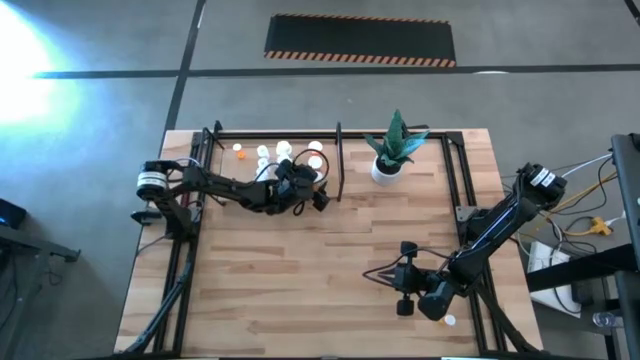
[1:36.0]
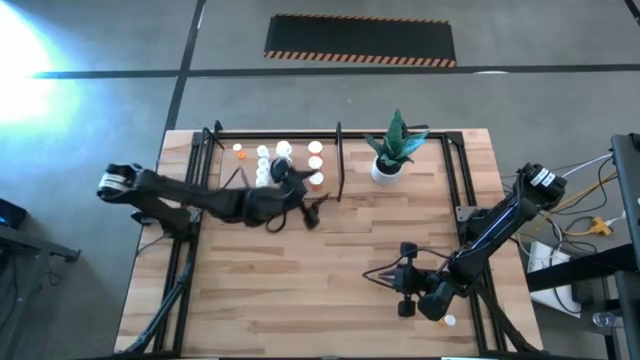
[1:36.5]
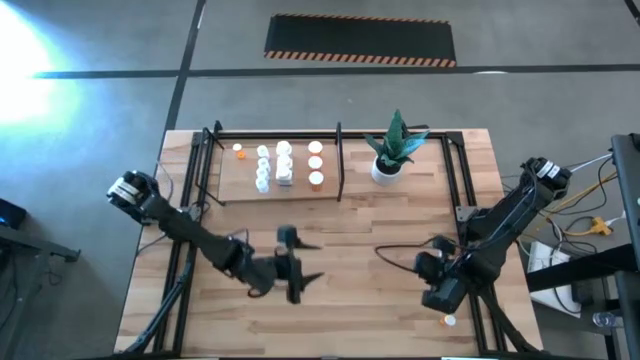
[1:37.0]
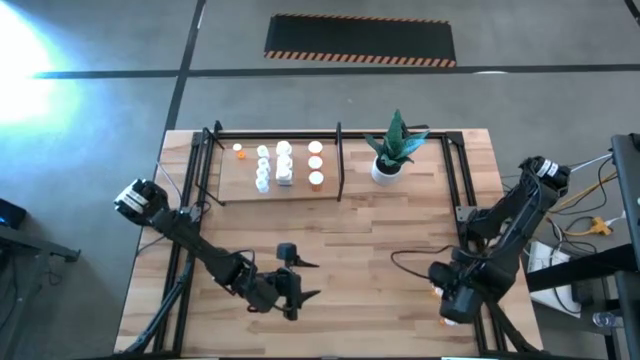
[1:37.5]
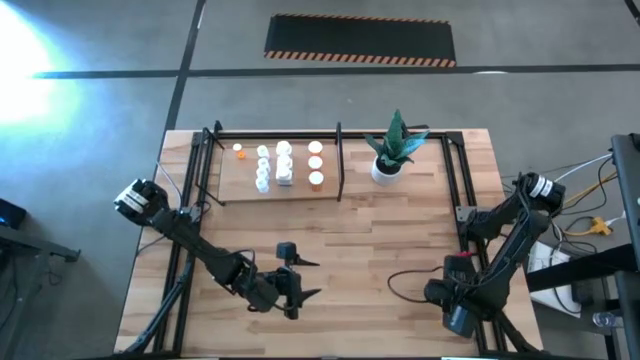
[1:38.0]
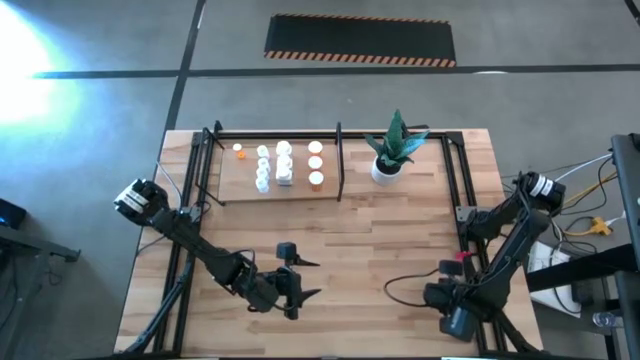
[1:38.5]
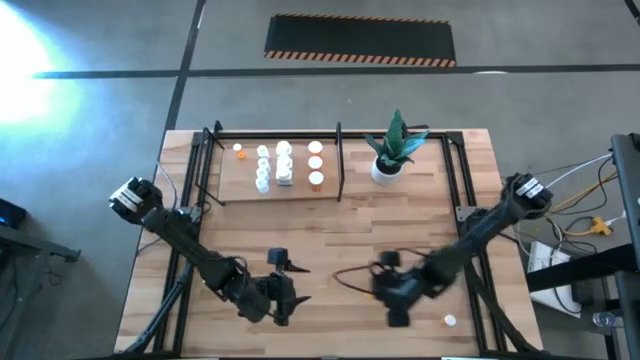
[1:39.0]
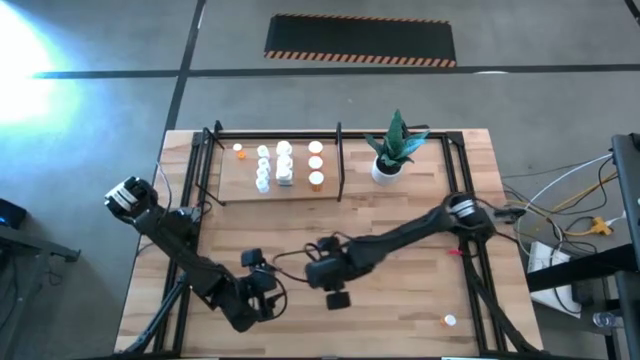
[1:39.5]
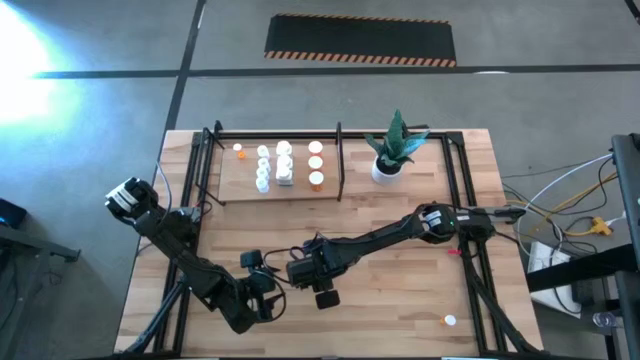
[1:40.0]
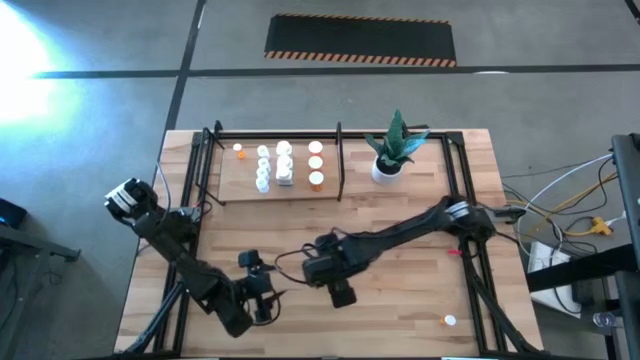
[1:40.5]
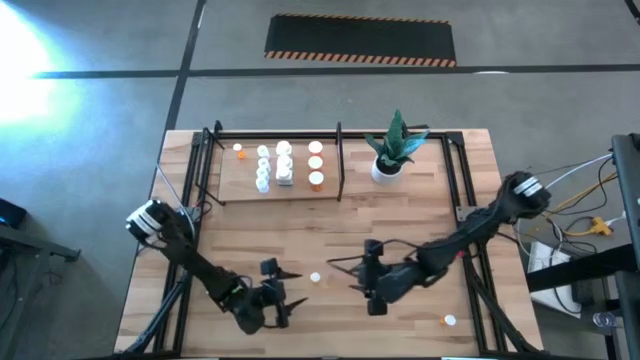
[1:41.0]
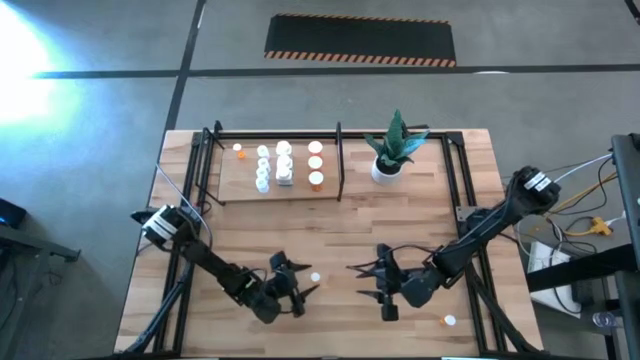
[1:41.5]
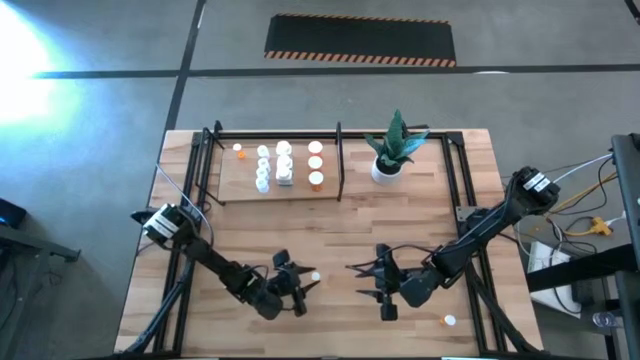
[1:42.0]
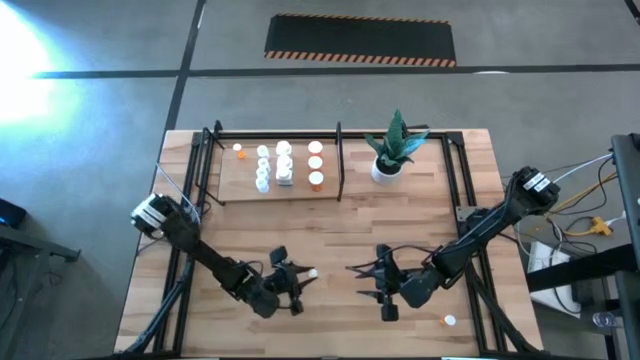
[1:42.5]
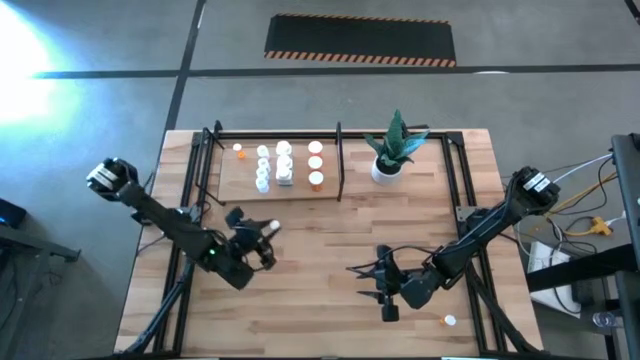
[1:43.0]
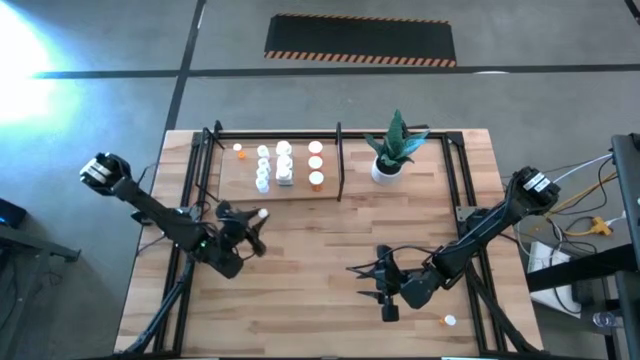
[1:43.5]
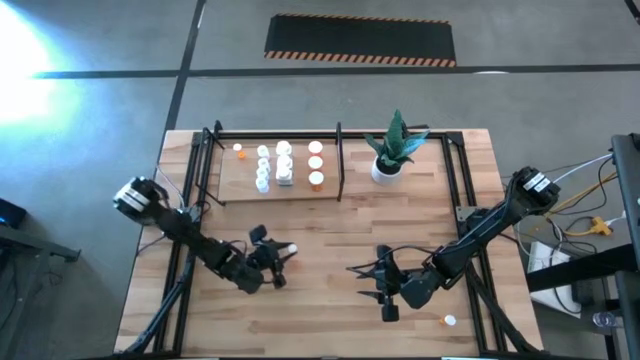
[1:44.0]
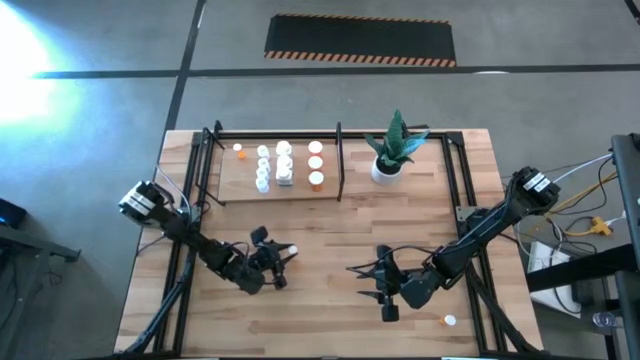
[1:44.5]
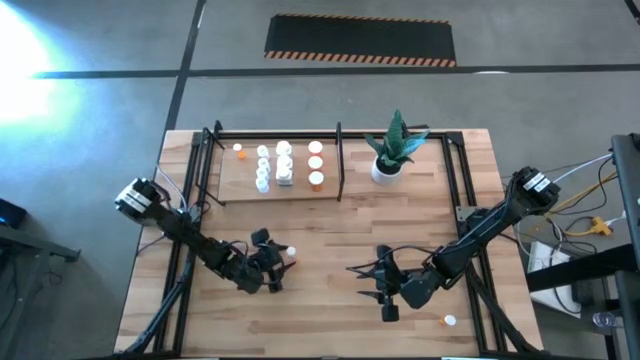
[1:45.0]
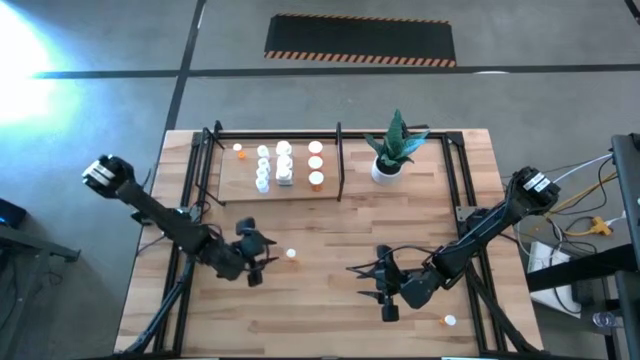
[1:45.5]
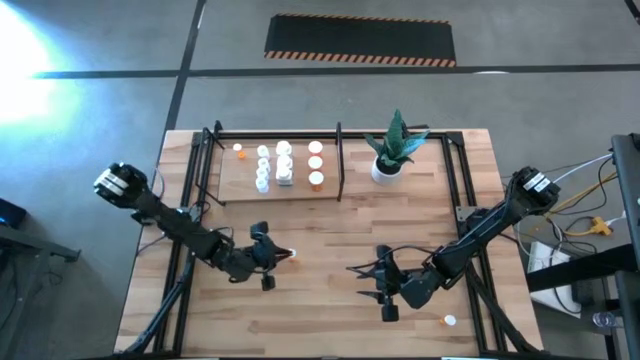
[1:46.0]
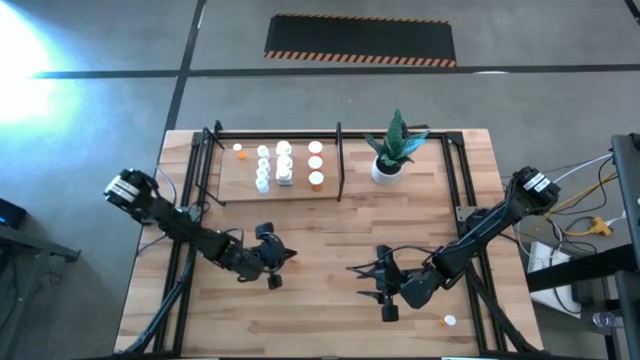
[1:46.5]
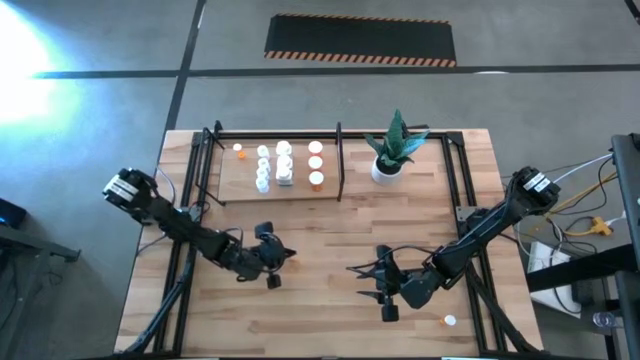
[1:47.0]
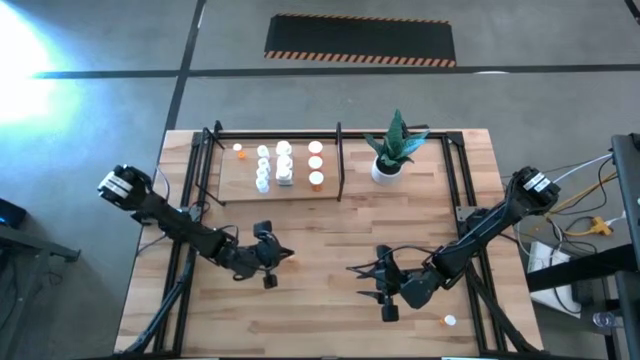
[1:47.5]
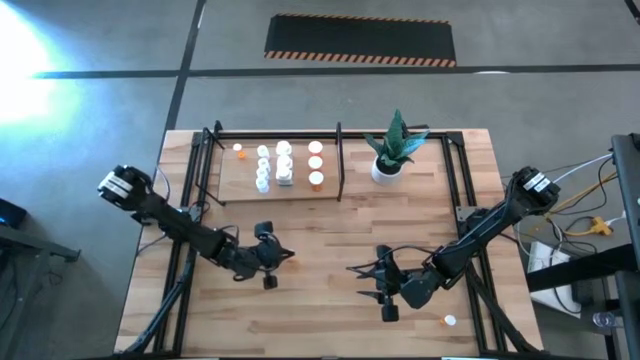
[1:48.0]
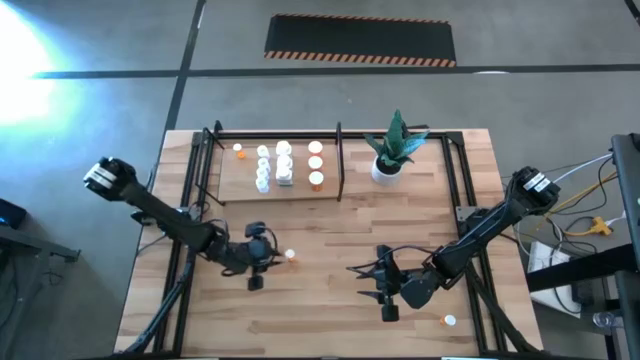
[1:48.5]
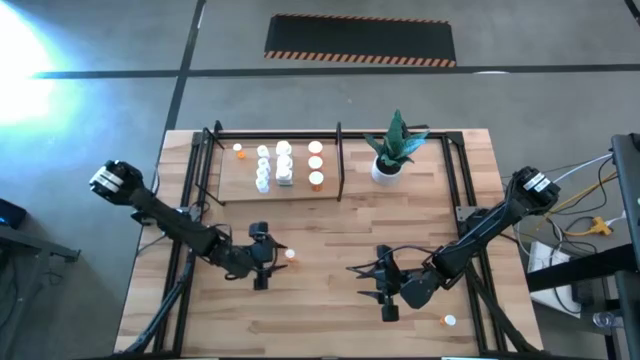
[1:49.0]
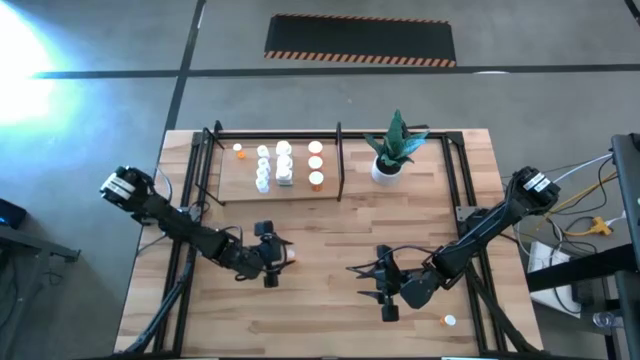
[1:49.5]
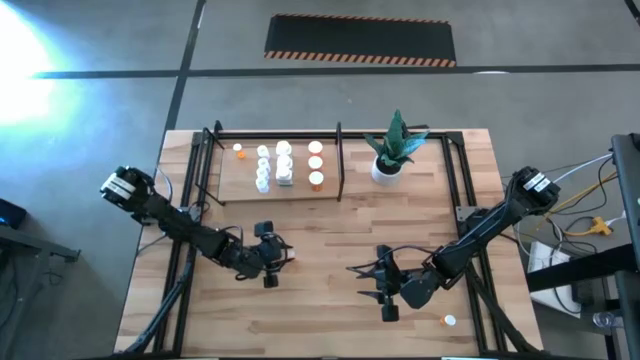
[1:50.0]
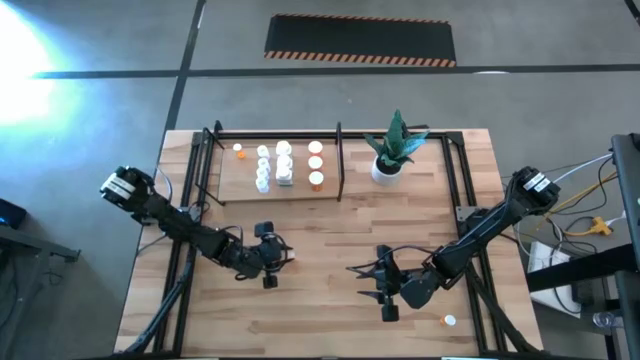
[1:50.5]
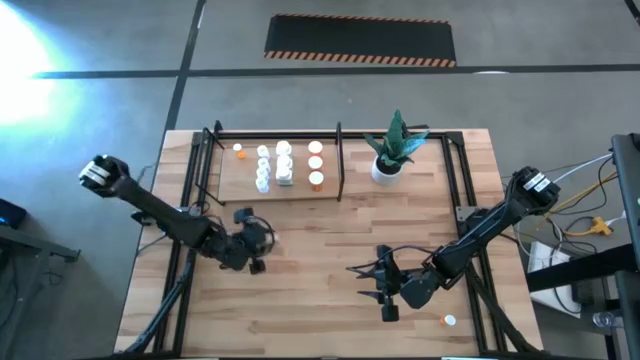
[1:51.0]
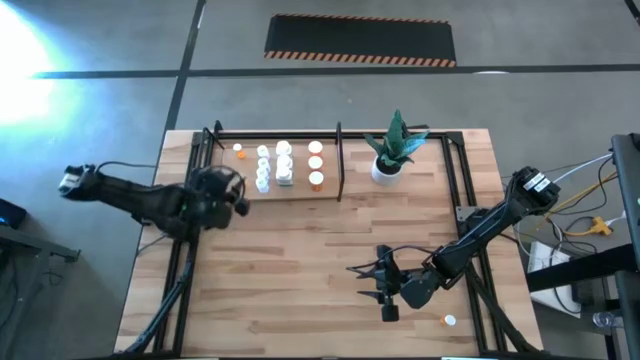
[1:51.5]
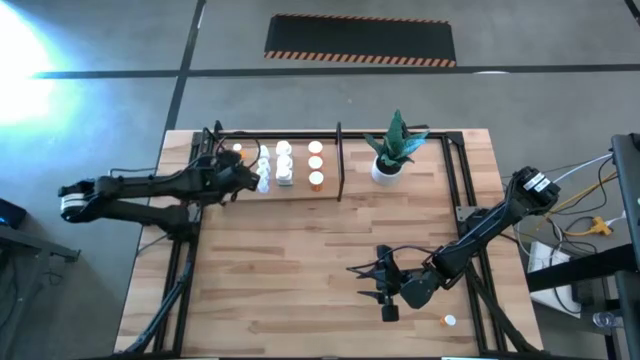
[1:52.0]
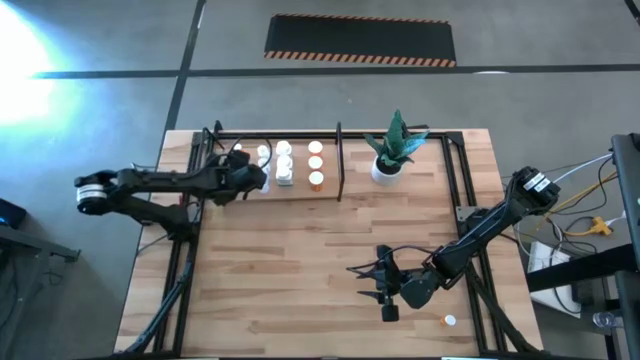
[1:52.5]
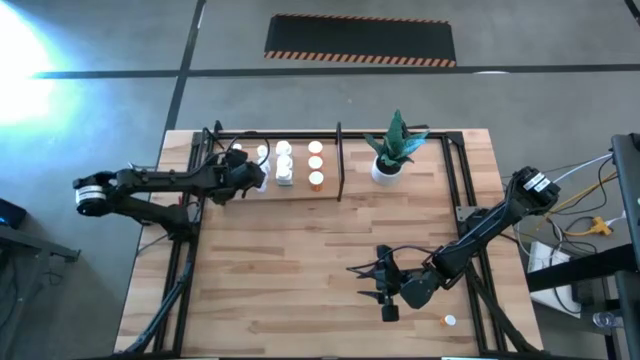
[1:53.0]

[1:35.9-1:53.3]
Task: Pick and place medicine bottles onto shelf by color
Put the small orange medicine container on the shelf

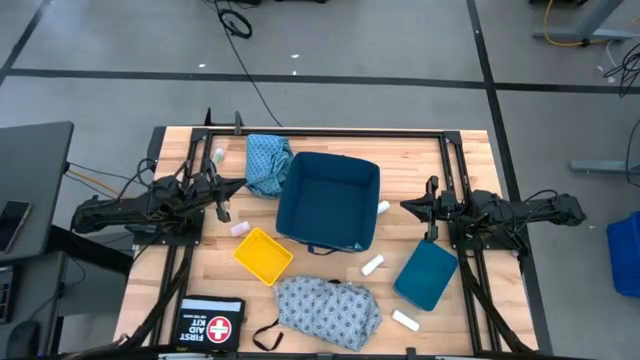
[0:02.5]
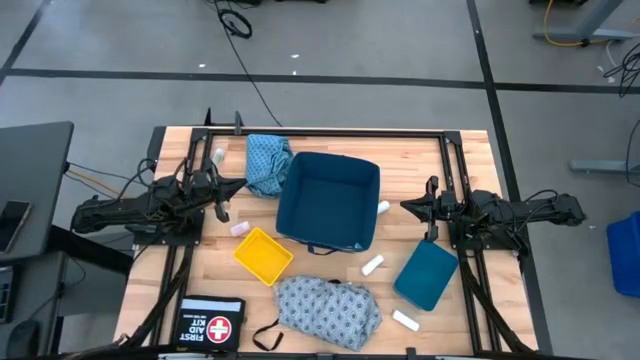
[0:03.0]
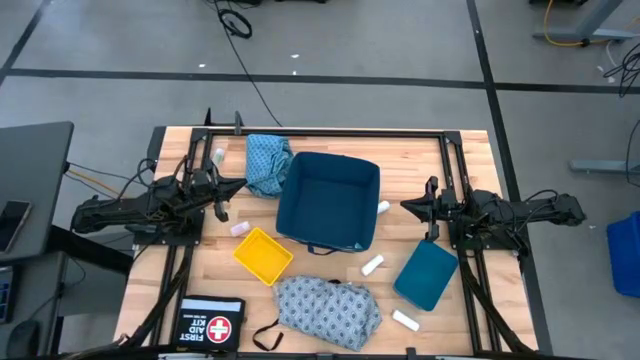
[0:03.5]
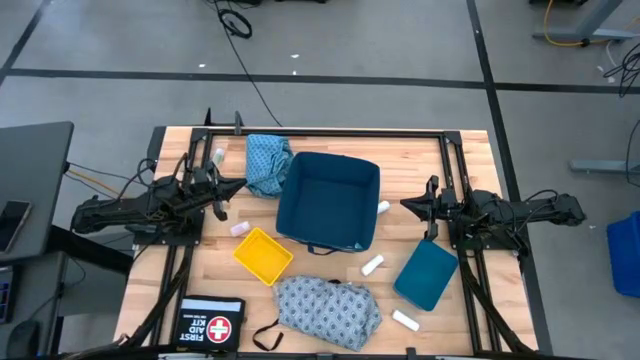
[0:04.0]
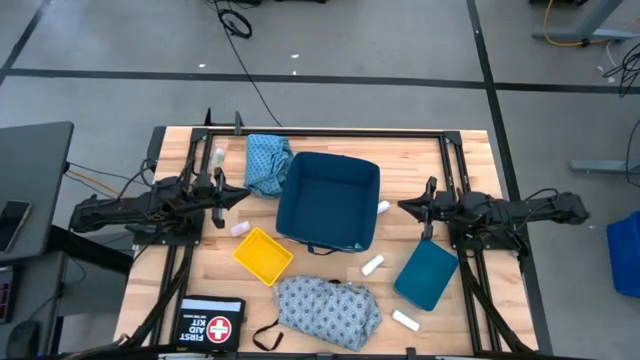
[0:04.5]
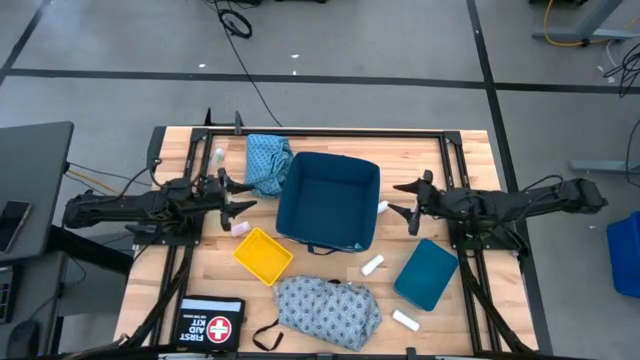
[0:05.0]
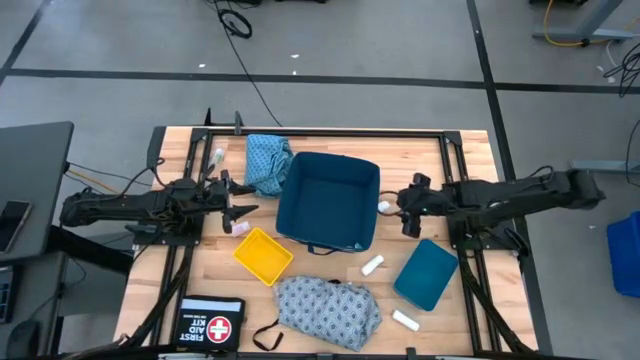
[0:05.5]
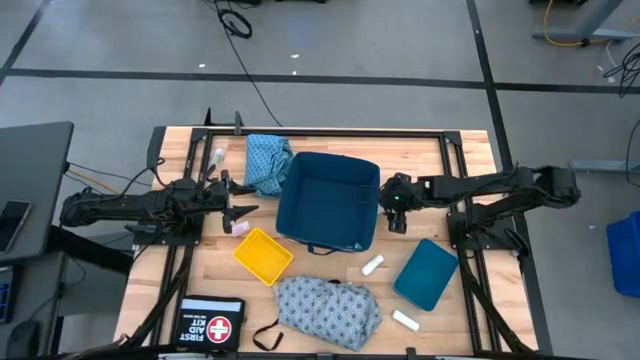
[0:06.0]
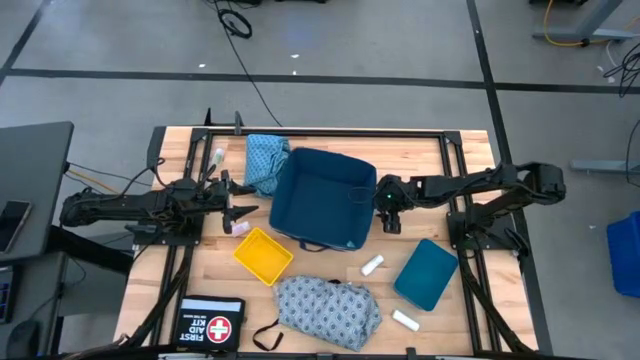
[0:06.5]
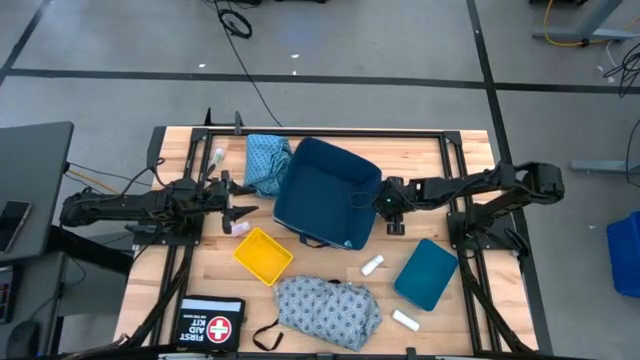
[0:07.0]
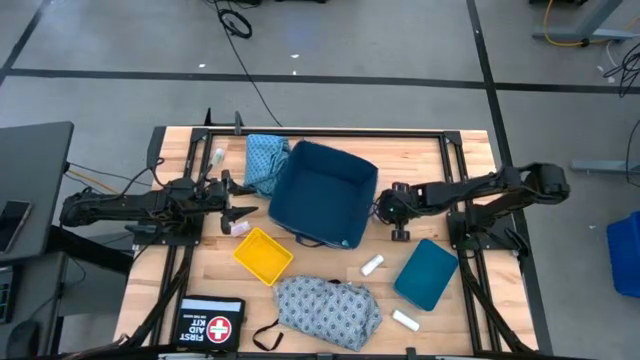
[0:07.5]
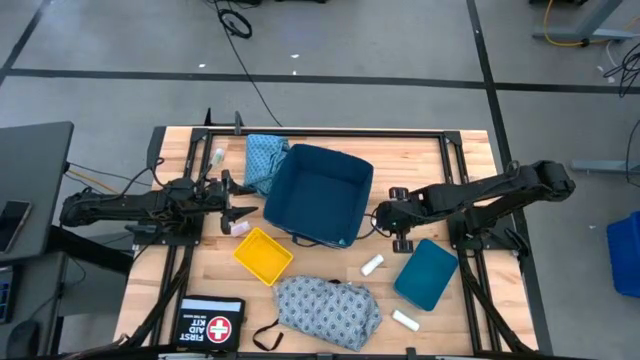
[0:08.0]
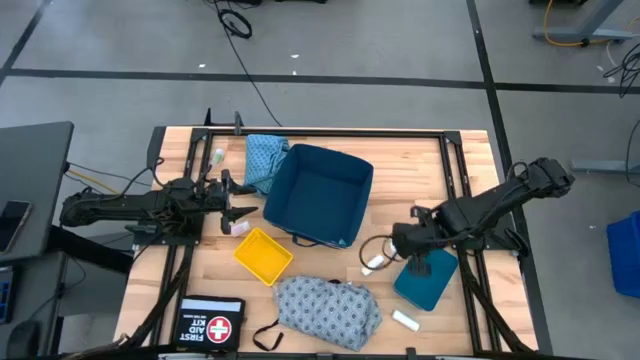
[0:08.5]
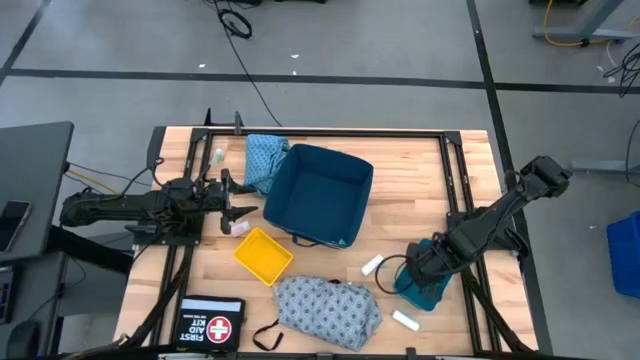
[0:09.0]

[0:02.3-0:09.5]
Task: Pick & place medical supplies in basket/bin
Put the top white bandage into the blue bin
